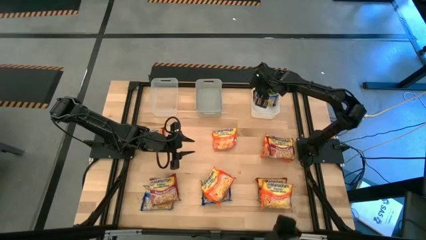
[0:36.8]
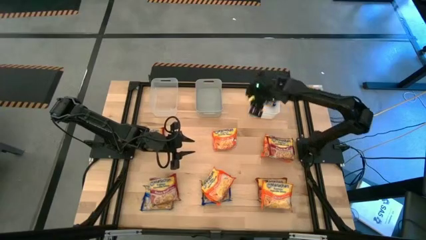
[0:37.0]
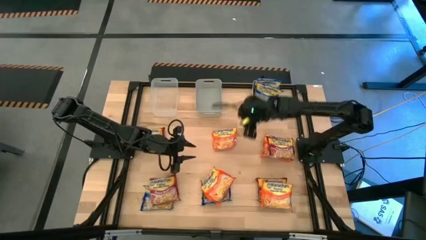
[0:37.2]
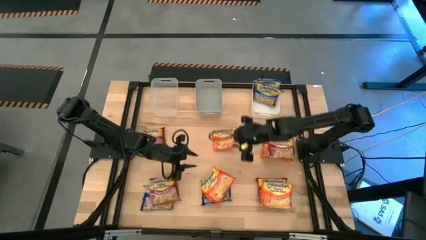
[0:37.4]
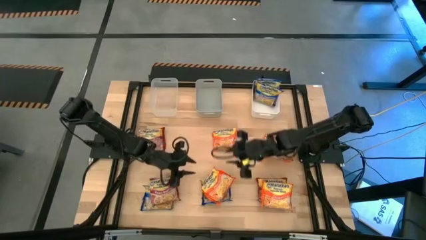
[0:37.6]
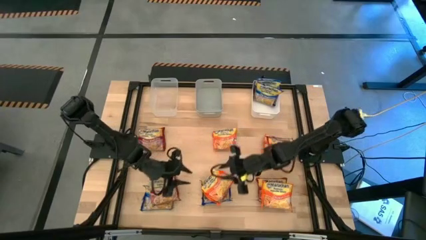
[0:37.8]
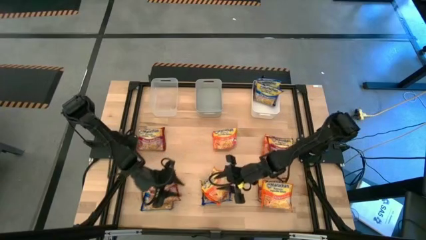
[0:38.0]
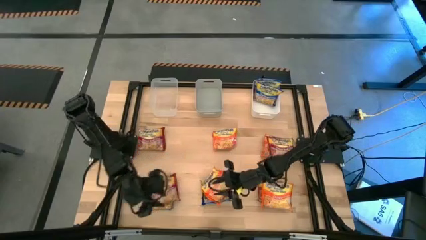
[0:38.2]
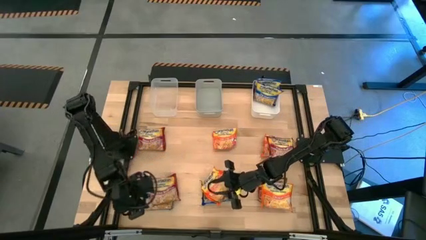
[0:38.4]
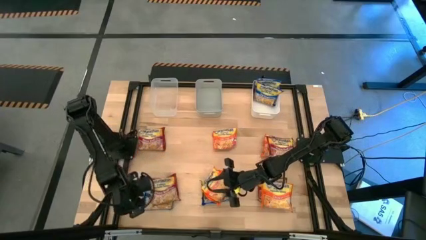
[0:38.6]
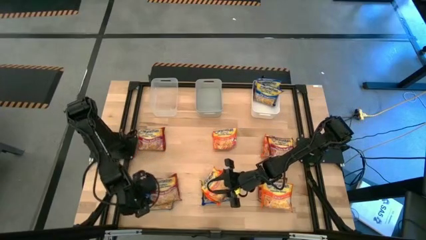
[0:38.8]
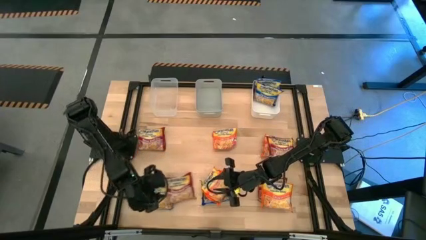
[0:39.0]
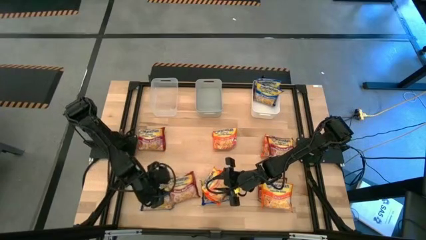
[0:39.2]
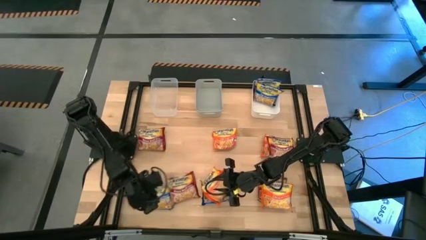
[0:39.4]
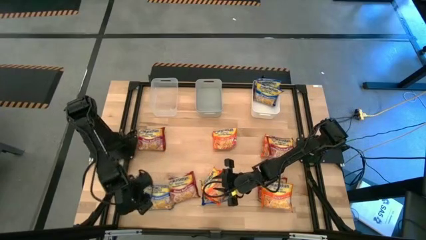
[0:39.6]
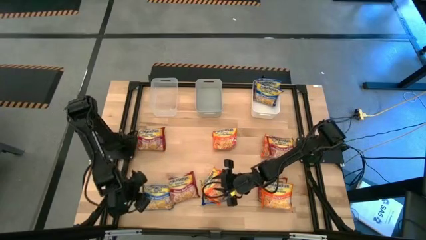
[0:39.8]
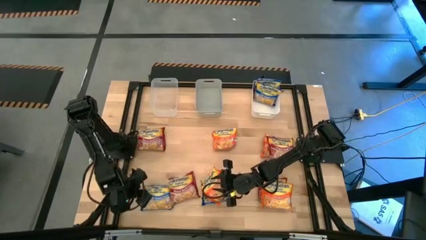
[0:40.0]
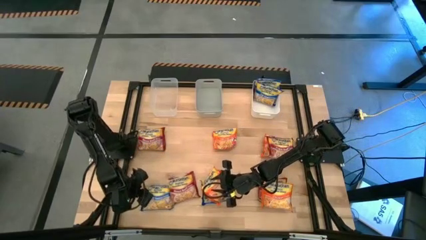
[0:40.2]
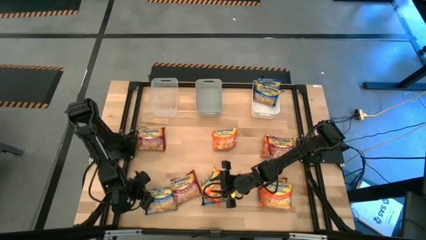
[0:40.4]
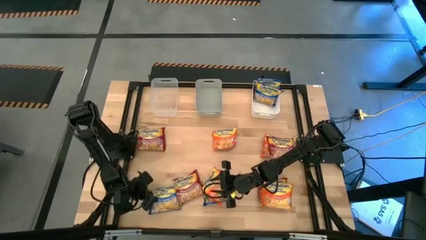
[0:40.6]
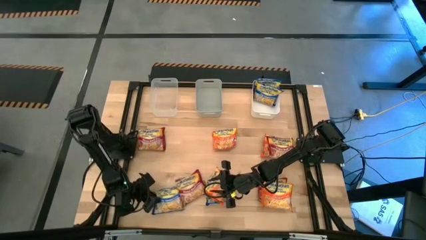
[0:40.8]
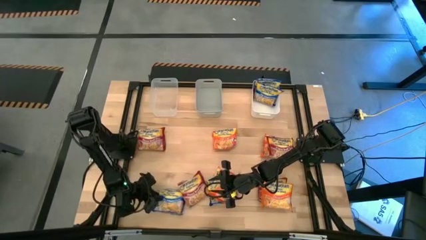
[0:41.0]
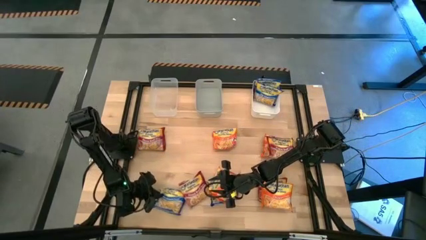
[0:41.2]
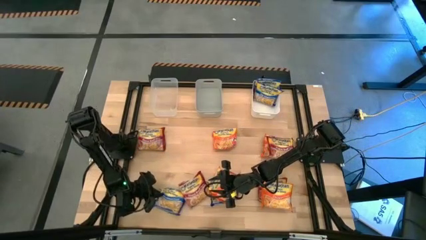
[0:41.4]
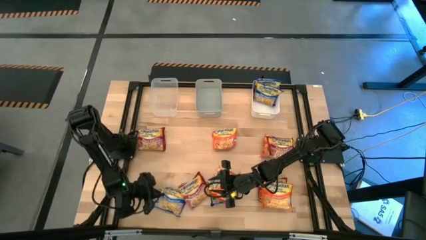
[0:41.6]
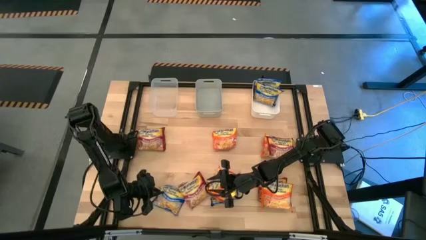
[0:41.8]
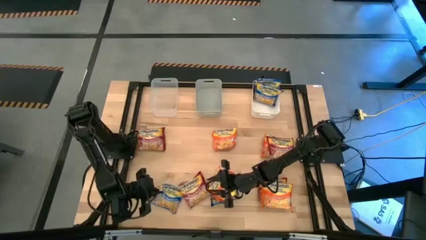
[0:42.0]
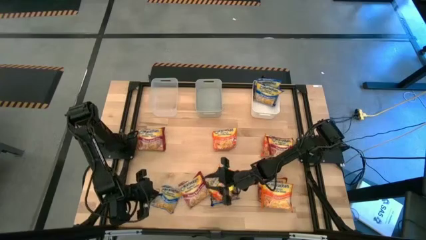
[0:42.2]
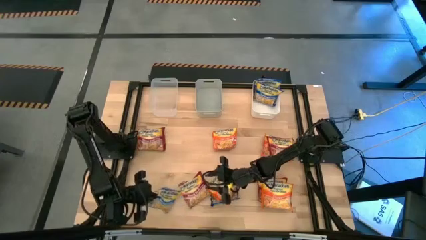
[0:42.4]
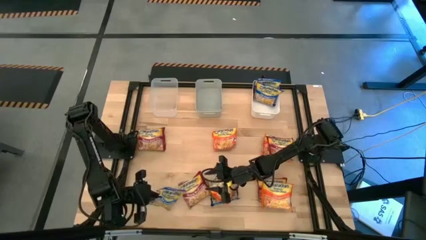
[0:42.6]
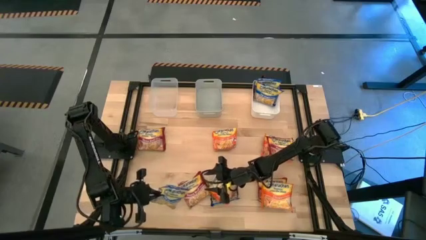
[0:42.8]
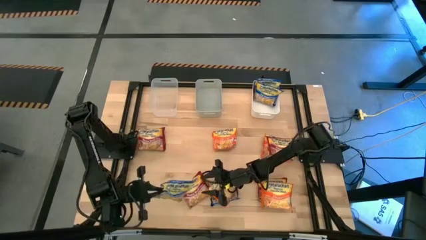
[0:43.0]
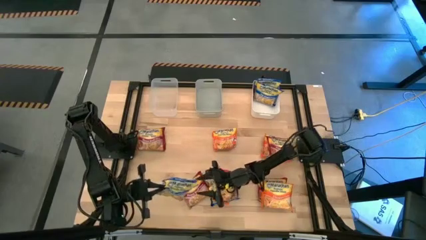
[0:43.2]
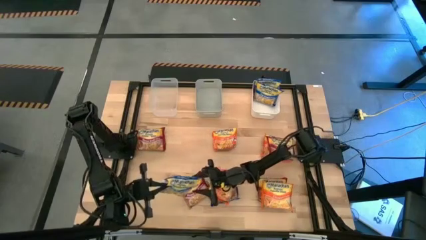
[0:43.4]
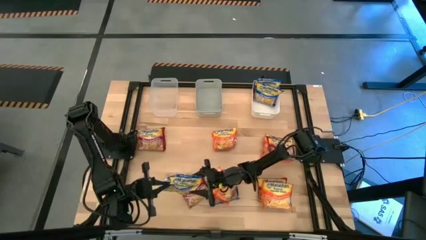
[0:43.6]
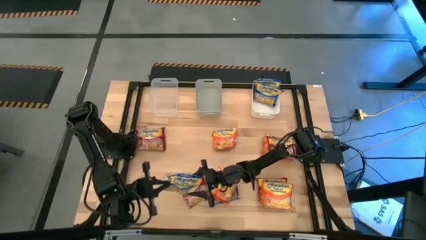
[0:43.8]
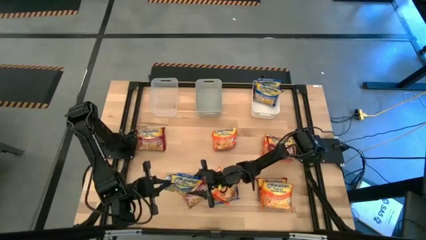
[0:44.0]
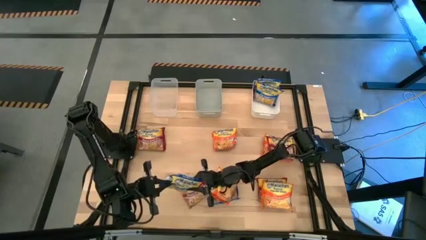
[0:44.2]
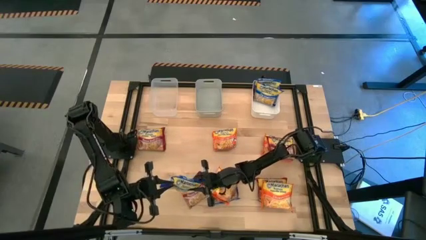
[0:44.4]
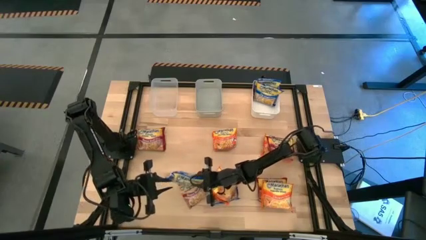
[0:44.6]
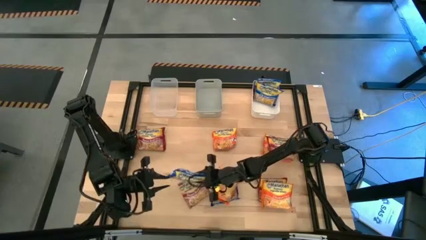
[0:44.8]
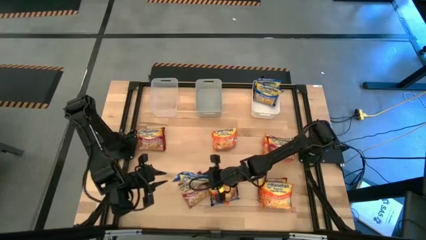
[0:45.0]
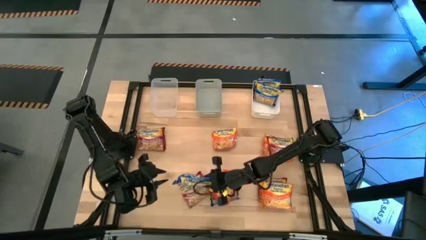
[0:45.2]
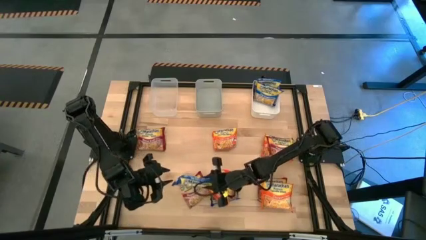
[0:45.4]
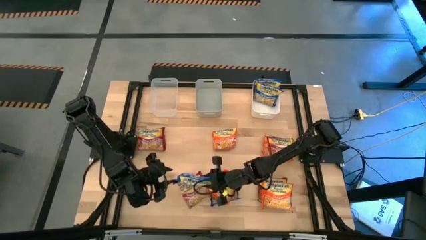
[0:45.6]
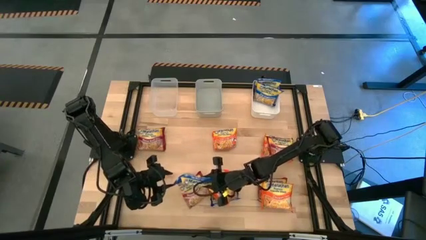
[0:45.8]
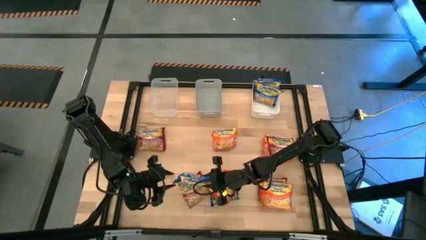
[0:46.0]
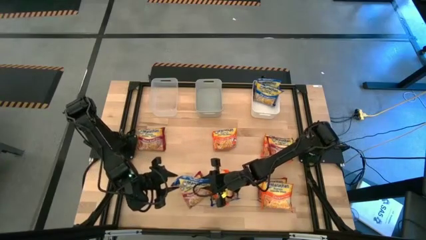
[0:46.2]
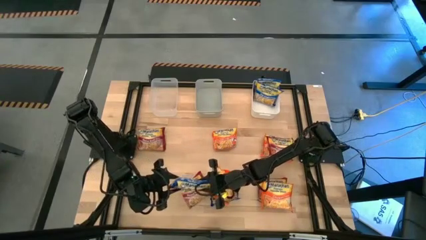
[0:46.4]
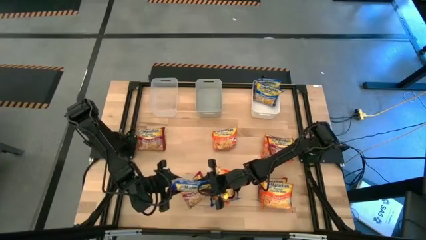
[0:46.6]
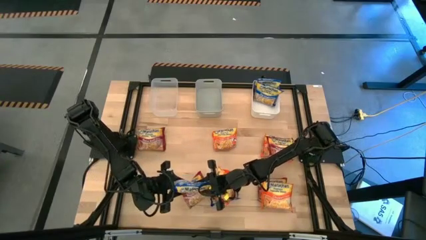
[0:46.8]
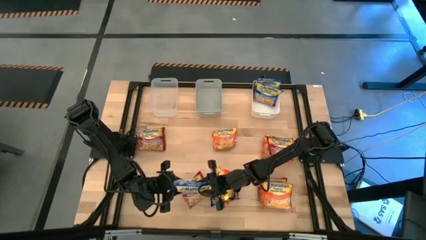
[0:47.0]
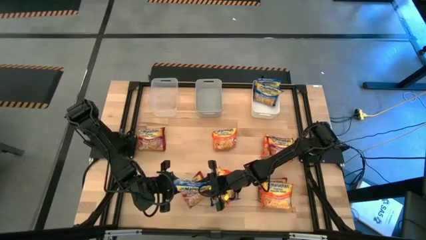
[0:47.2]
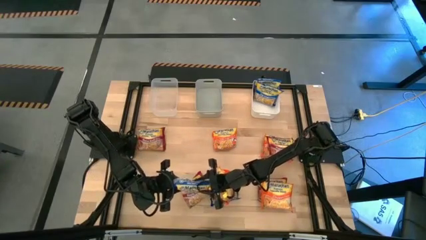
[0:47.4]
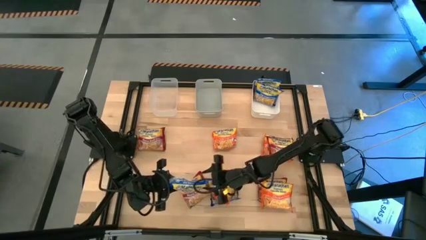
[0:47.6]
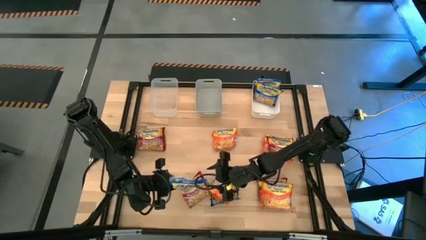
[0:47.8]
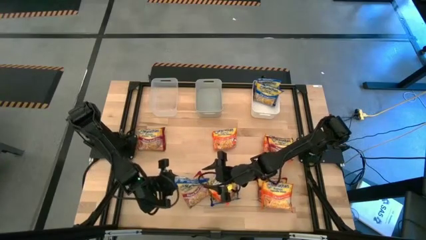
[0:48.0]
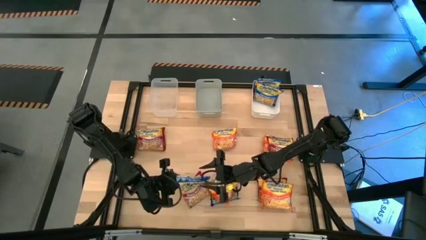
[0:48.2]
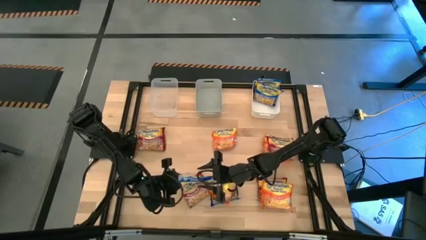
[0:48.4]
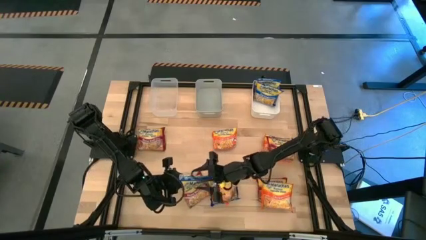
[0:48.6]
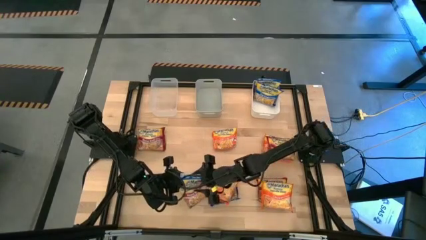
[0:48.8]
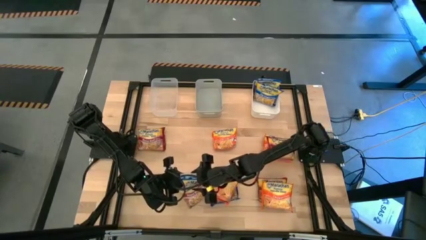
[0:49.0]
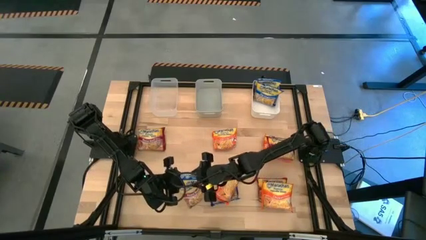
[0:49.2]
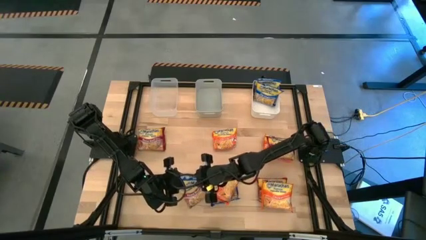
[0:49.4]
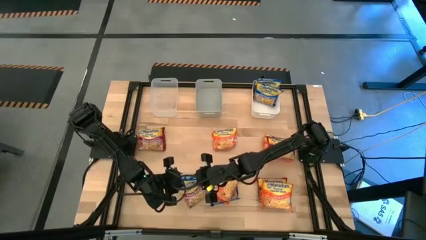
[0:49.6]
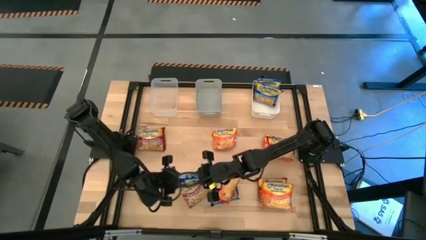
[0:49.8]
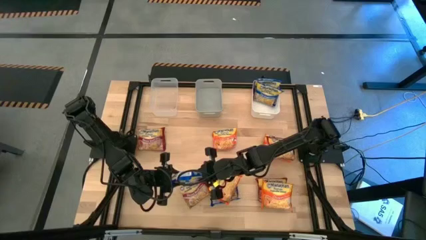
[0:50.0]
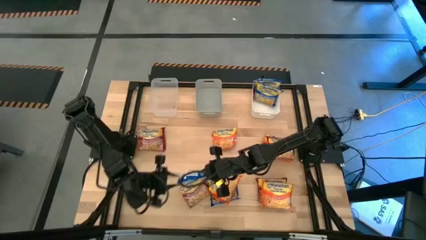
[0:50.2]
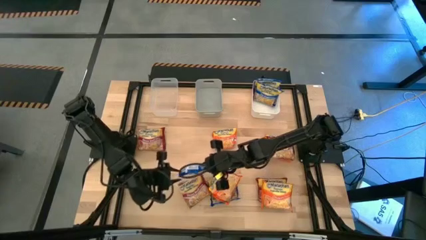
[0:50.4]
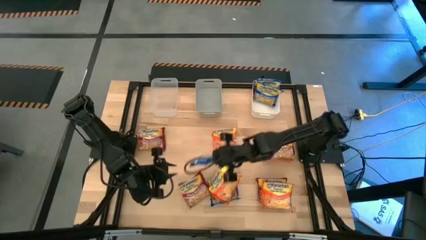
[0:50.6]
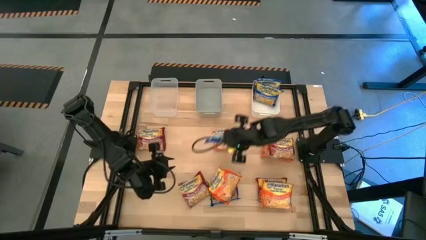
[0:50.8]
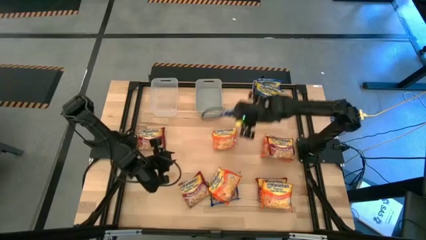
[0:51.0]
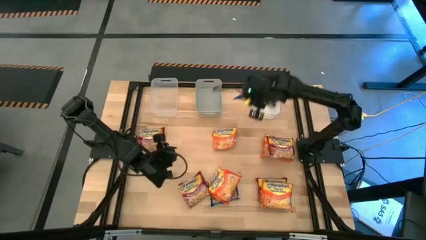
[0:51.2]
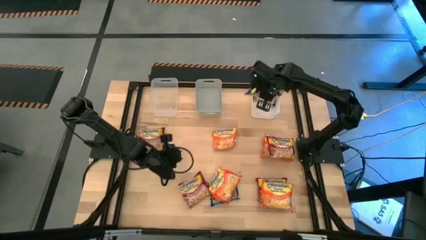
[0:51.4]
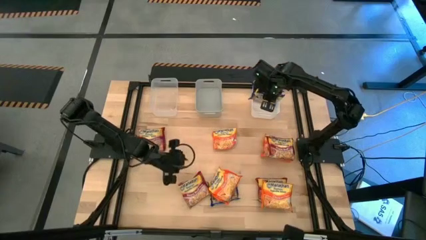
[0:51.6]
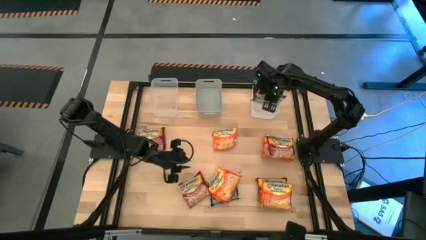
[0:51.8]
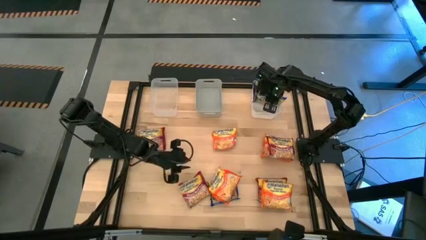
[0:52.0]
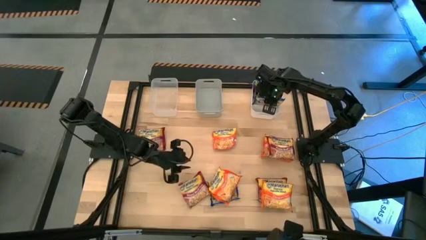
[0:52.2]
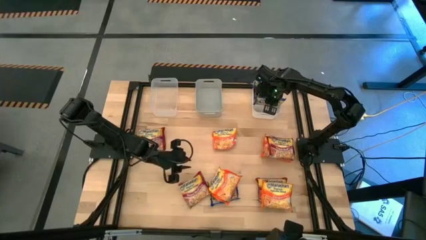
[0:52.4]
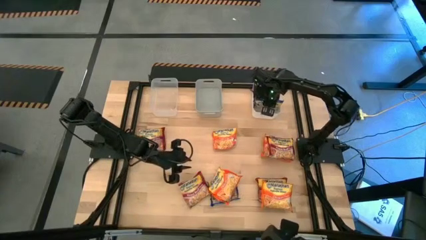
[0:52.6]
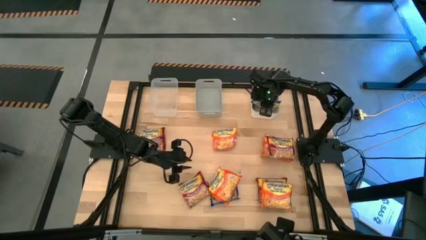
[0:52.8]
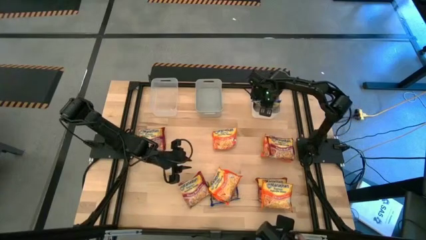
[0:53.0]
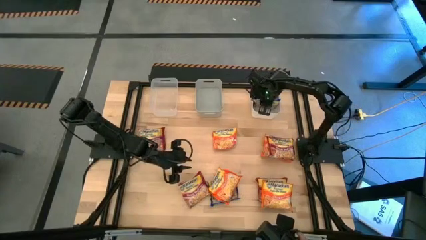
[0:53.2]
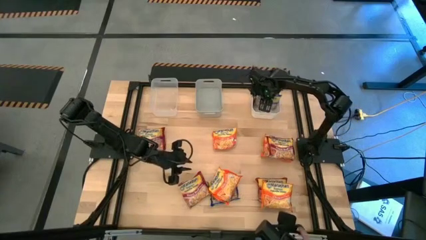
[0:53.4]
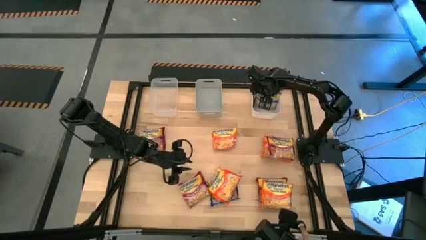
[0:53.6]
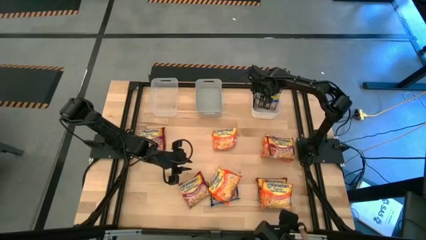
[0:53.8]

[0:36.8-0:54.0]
Task: Sort Maruchan noodles
Put the blue noodle pack into the white bin
